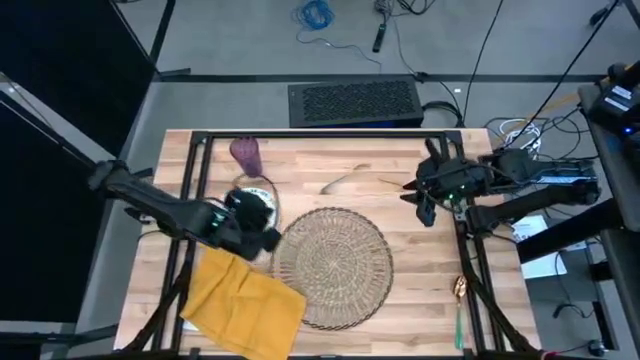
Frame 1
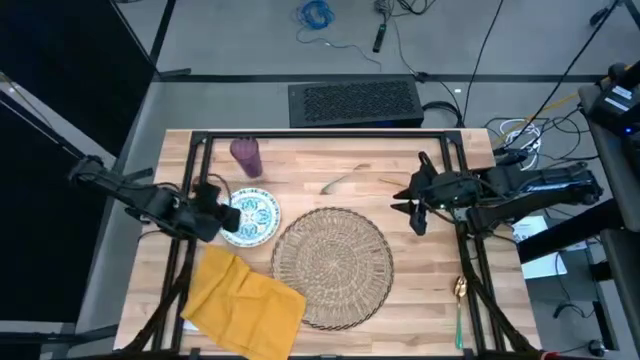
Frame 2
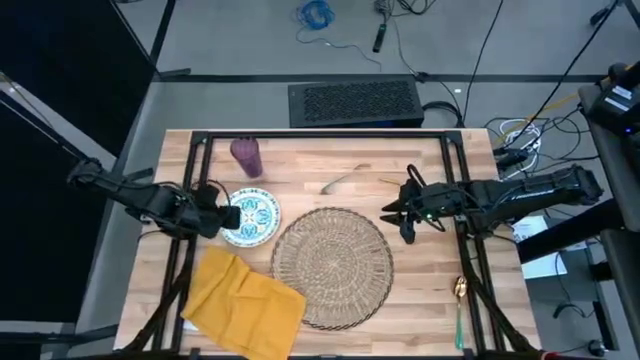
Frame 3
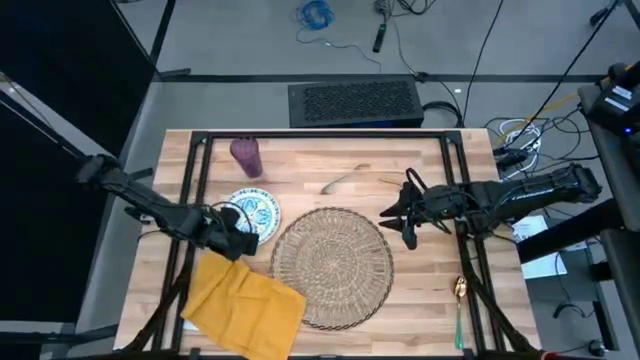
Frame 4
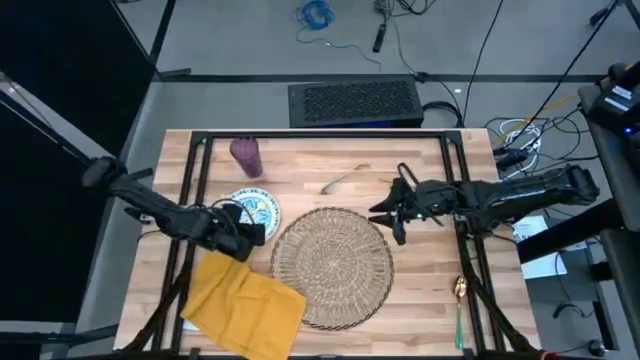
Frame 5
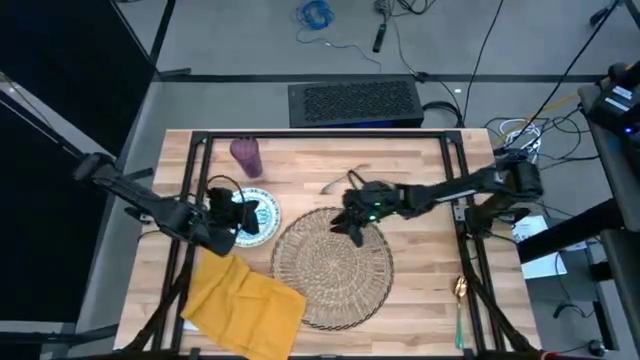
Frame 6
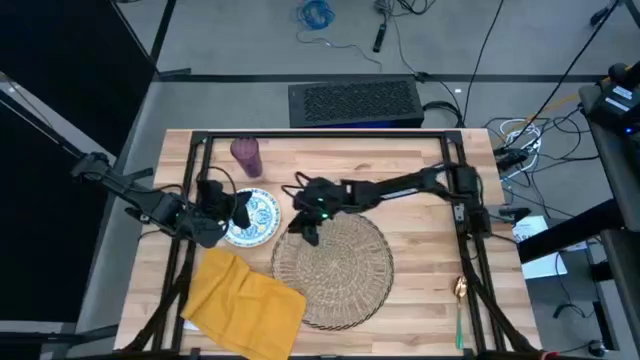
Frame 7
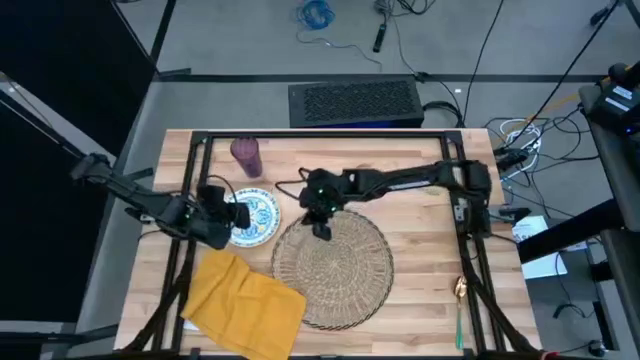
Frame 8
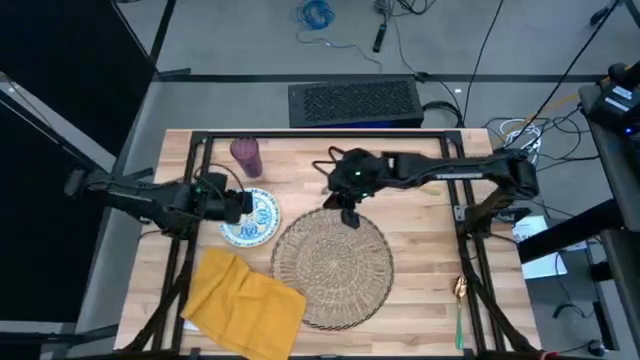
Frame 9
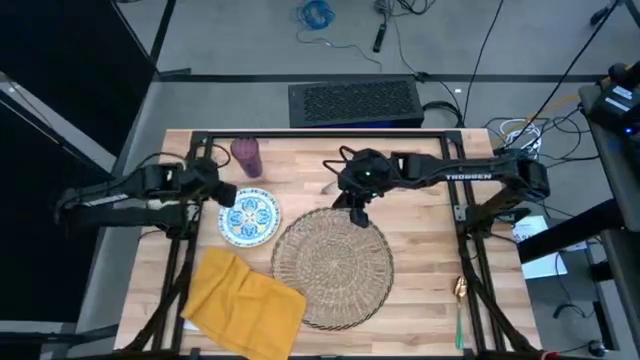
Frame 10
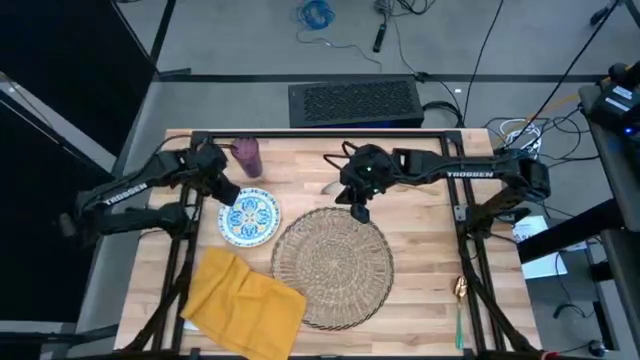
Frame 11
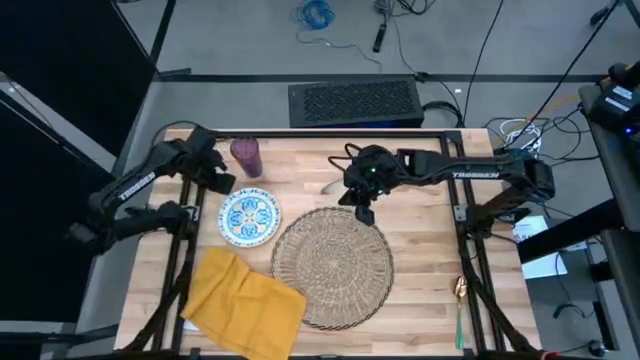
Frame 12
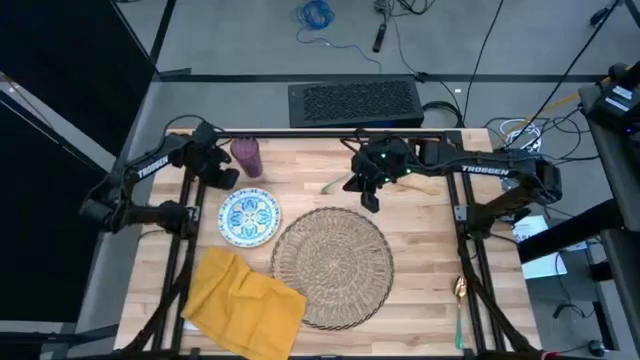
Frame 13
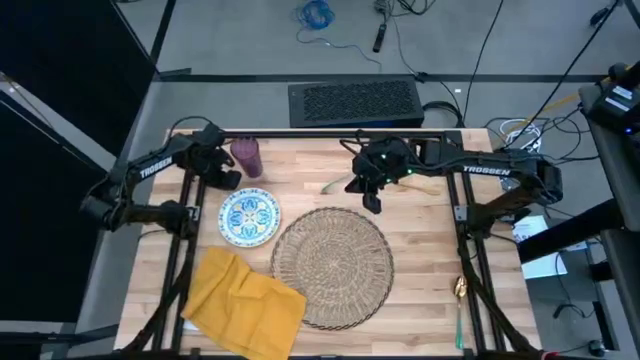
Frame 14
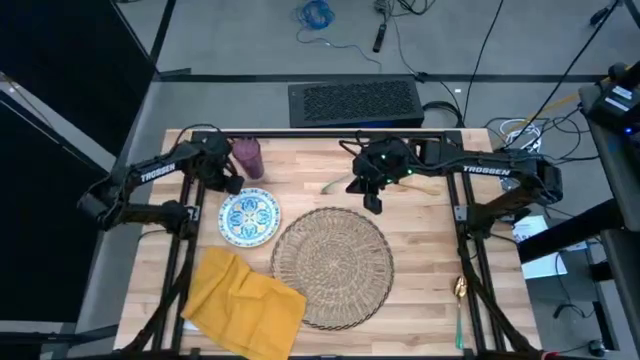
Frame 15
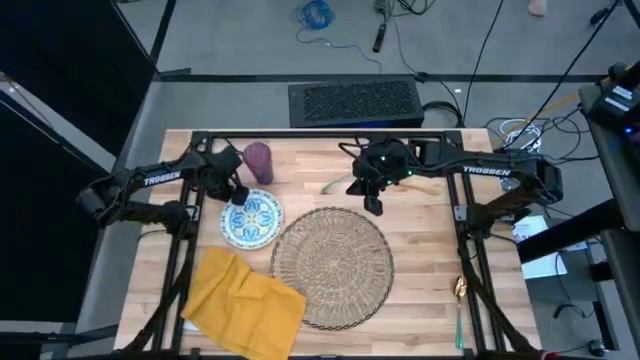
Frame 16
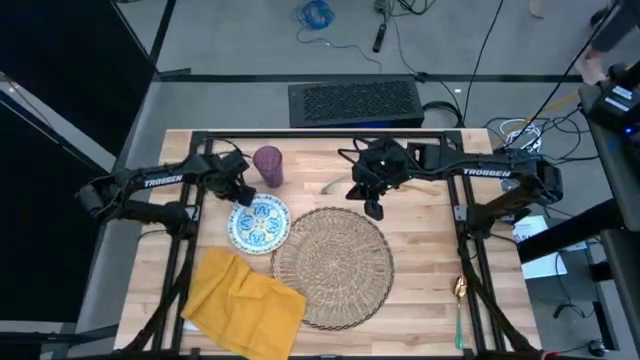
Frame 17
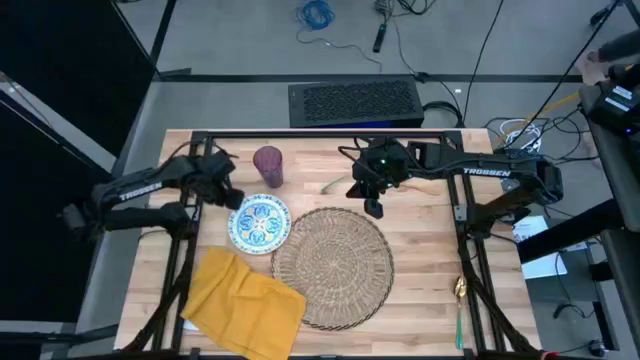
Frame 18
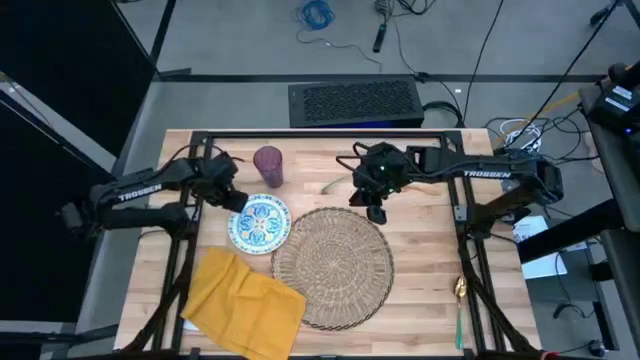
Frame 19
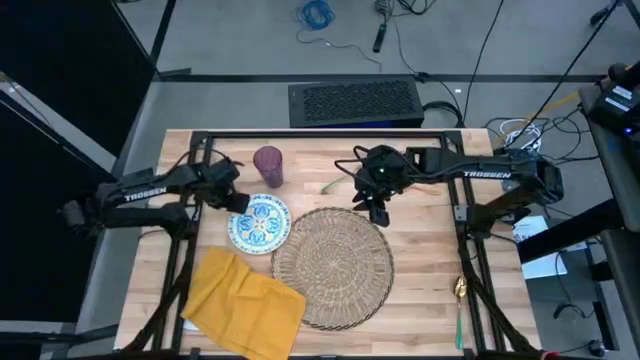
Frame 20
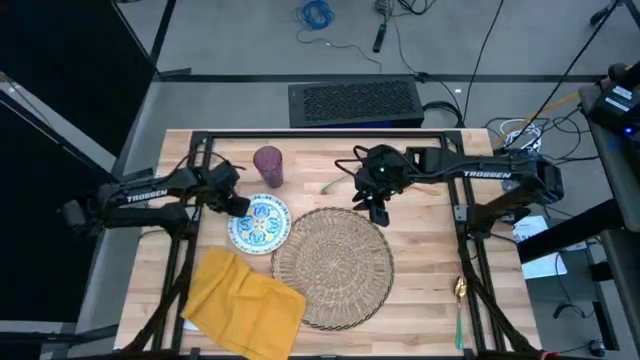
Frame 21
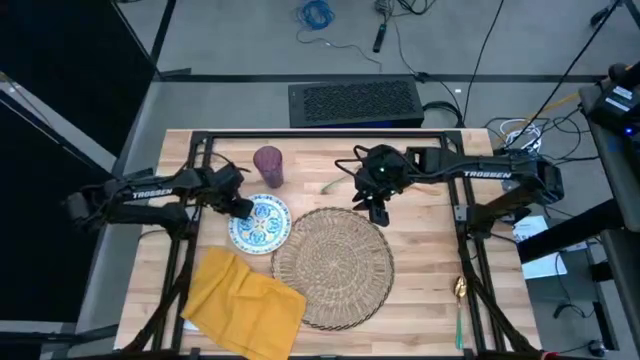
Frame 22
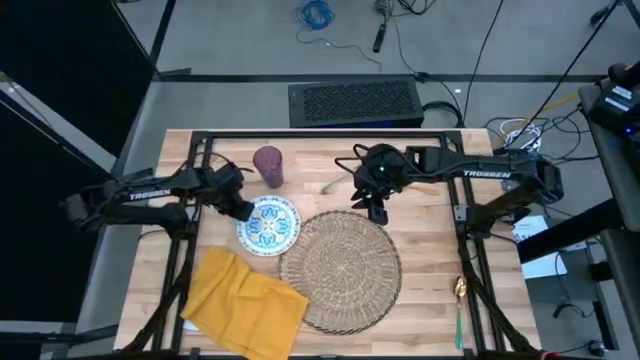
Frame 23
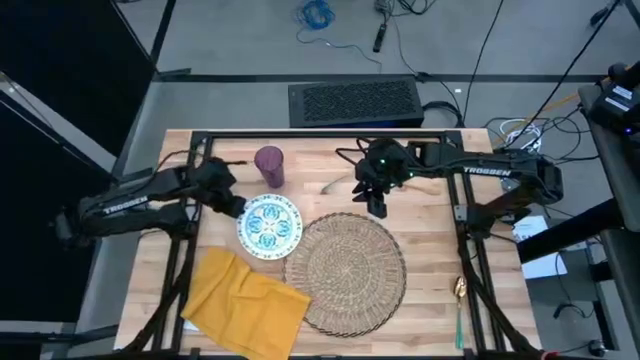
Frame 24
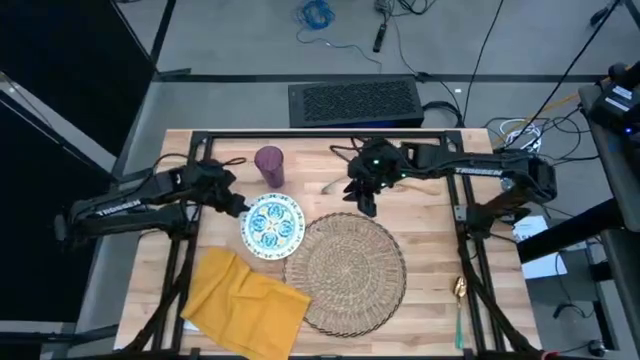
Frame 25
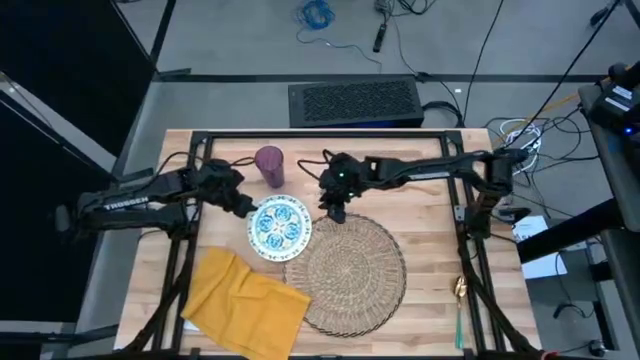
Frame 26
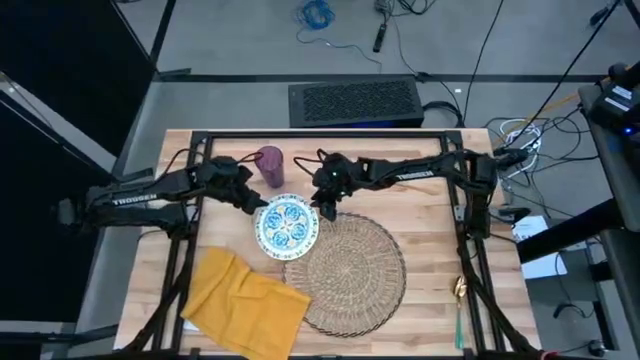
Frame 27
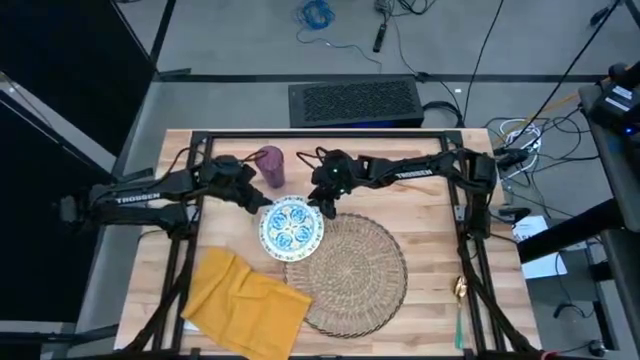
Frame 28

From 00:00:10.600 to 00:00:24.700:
Task: Set table place
Put the white plate on the brown placemat

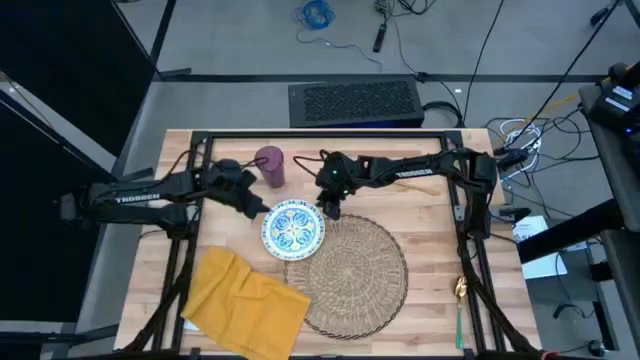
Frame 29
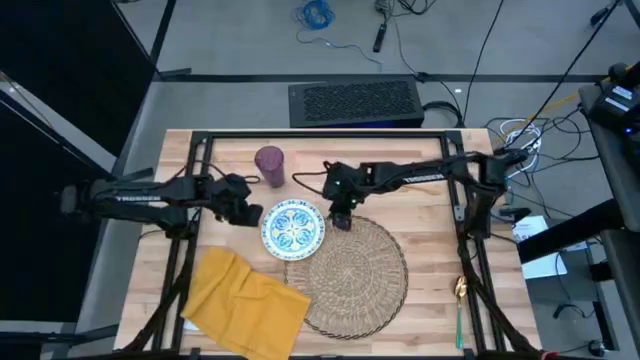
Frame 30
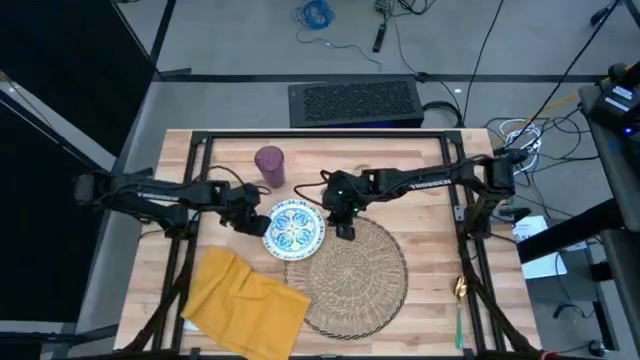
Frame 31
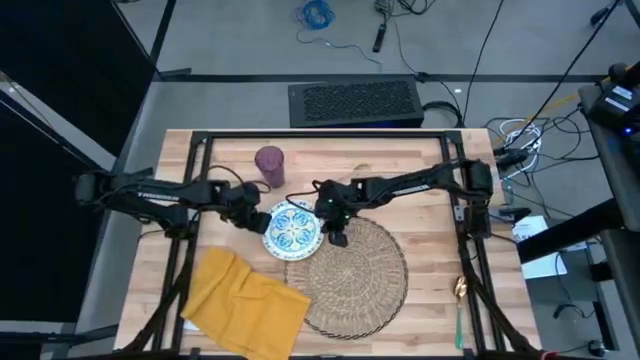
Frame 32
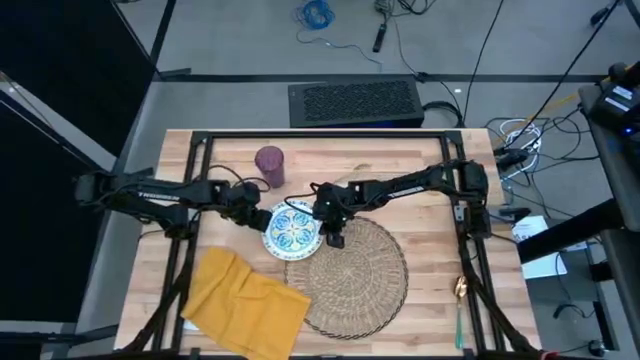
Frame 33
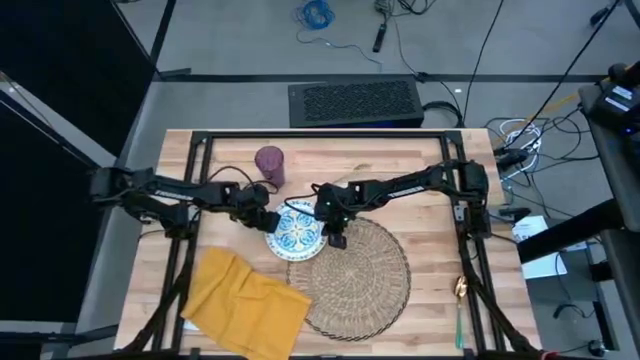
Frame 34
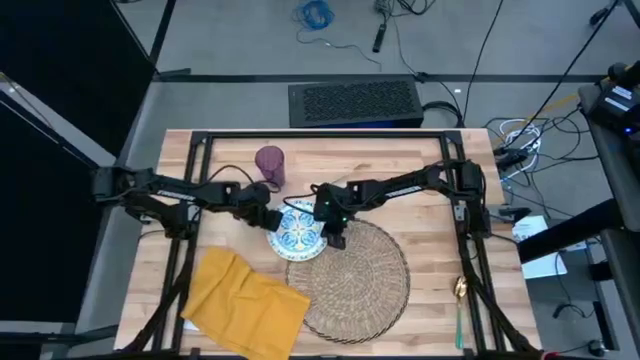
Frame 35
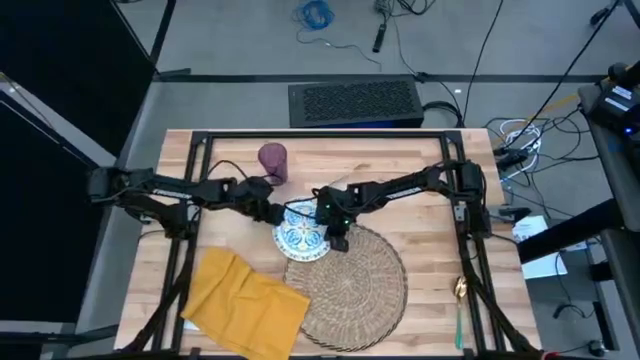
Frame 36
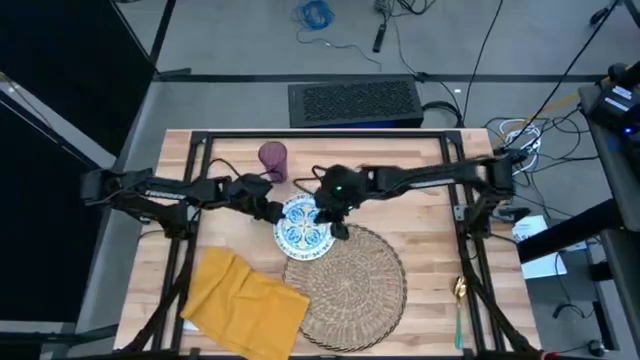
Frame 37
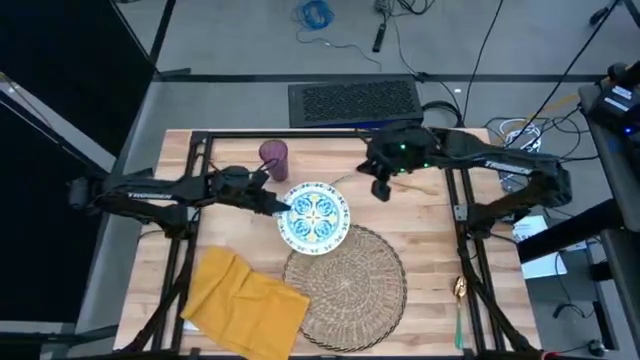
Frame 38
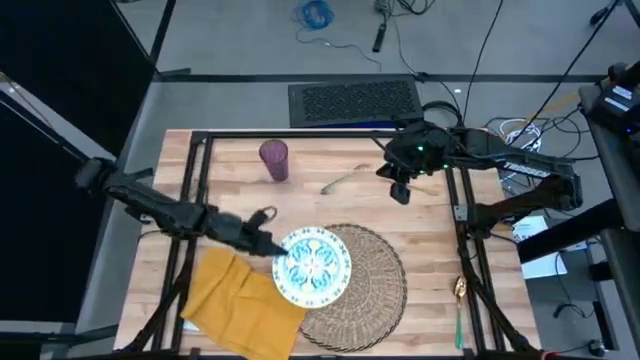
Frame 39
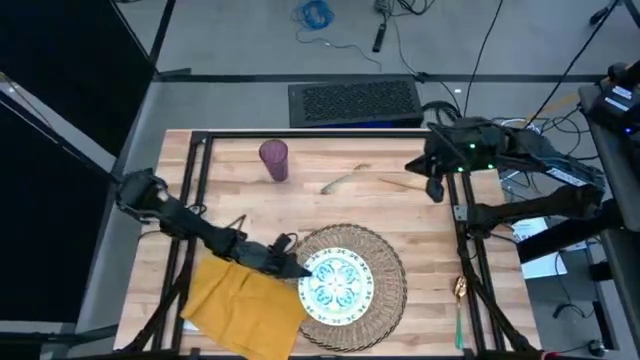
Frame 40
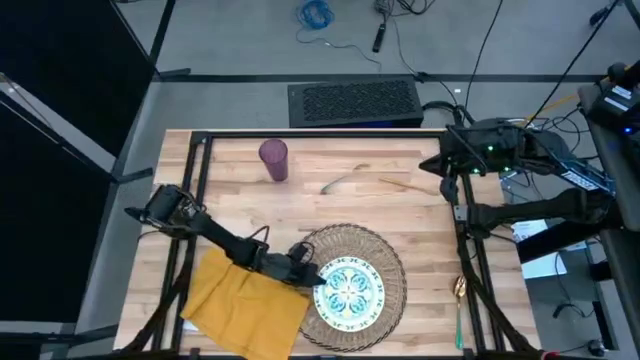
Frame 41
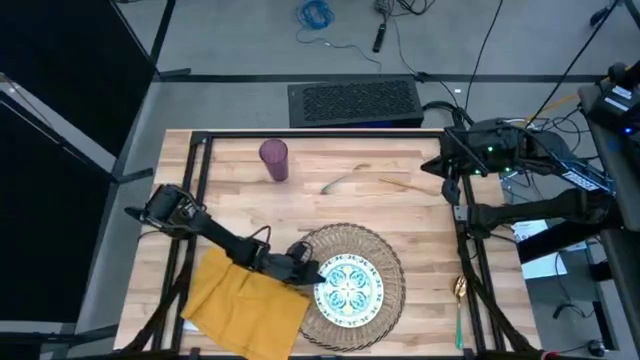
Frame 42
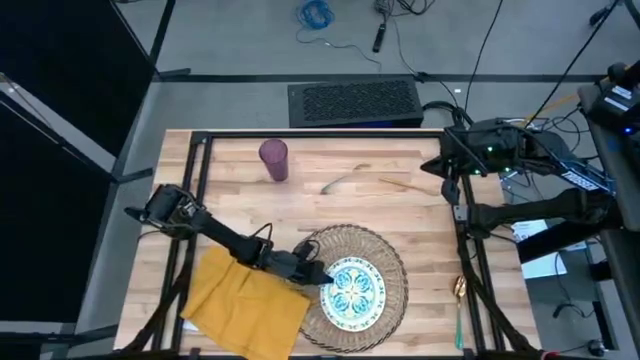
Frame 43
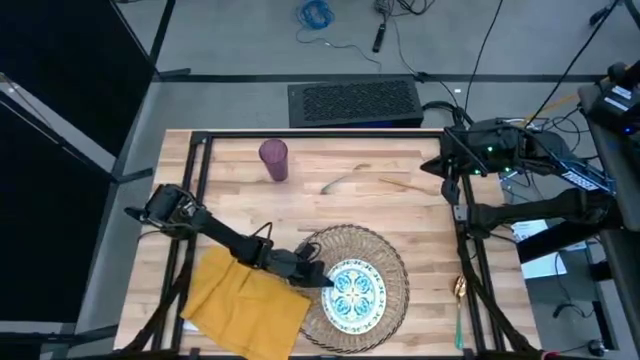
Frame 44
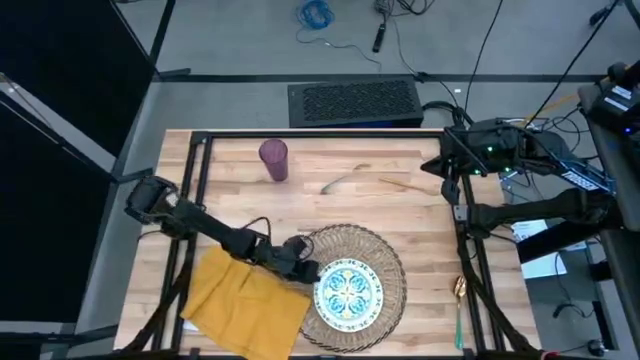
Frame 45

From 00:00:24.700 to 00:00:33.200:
Put the white plate on the brown placemat
